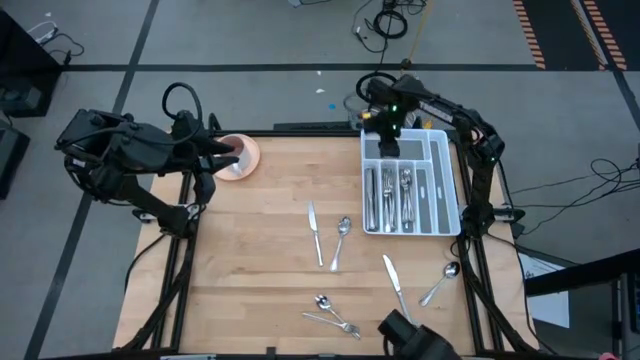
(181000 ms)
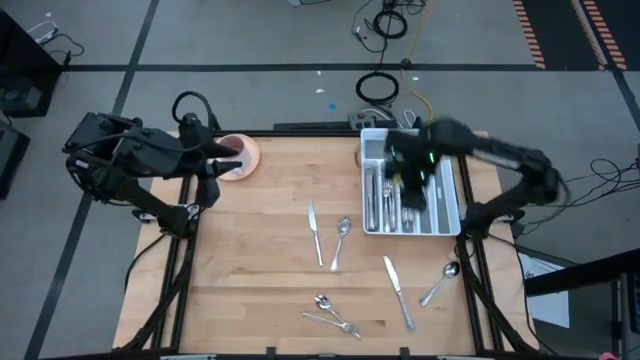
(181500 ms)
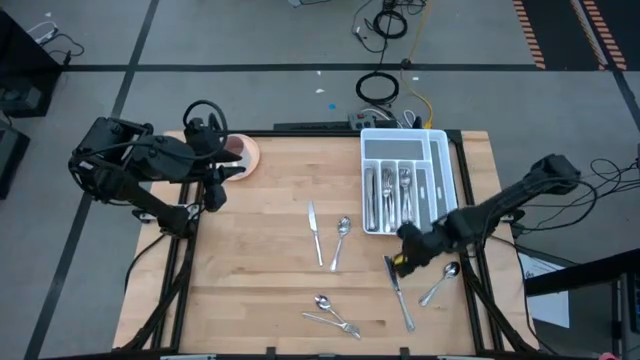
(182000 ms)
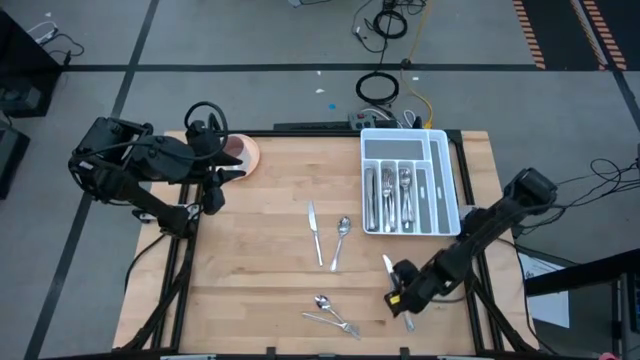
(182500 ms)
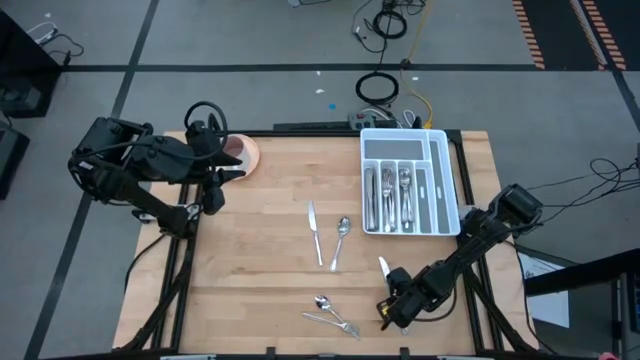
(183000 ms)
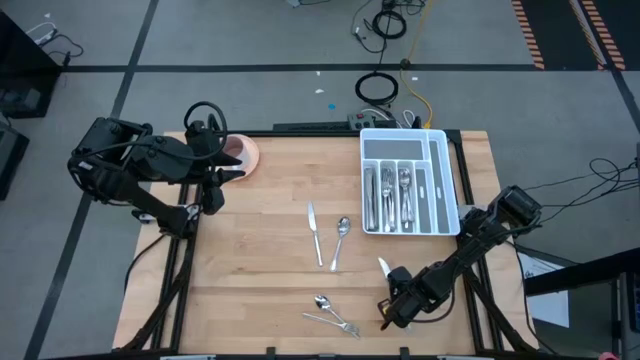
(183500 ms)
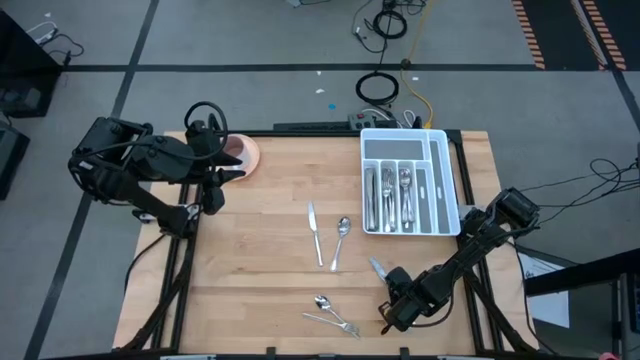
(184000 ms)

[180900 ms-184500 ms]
Task: Sort silverware
Put the silver knife into the white cutlery tray

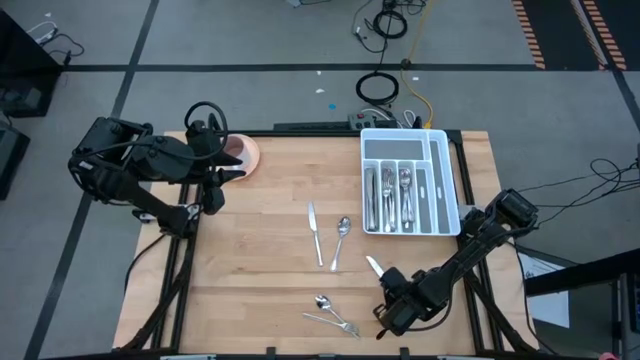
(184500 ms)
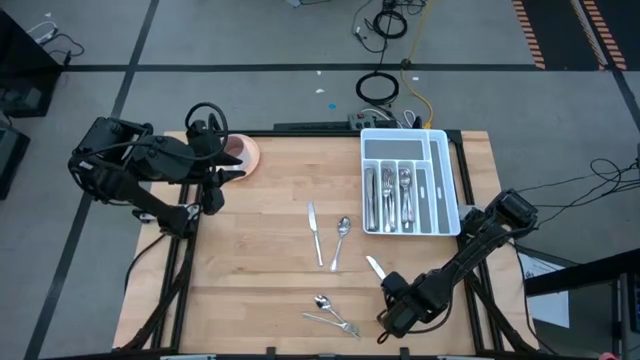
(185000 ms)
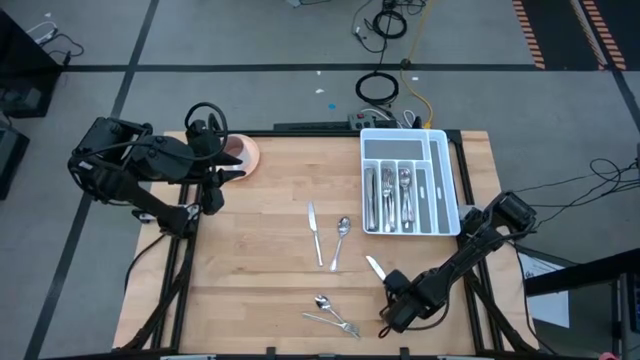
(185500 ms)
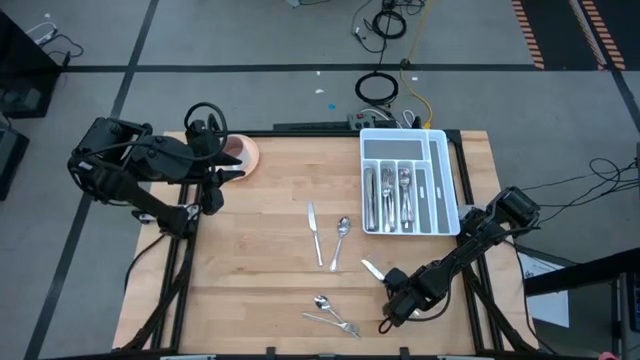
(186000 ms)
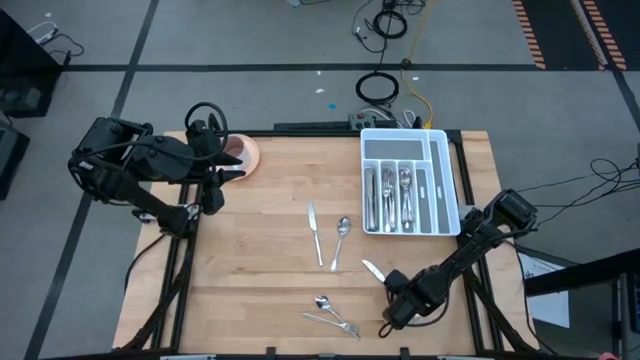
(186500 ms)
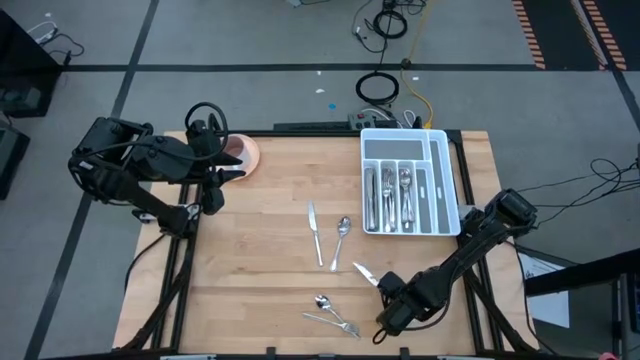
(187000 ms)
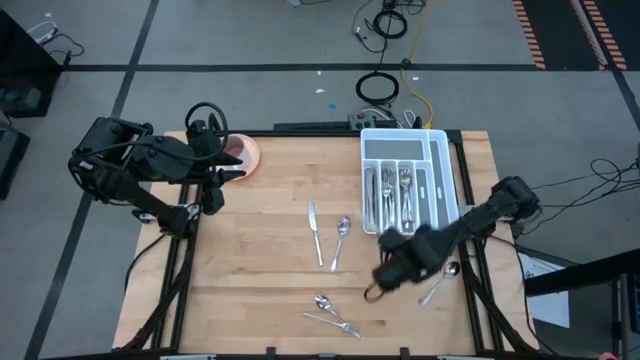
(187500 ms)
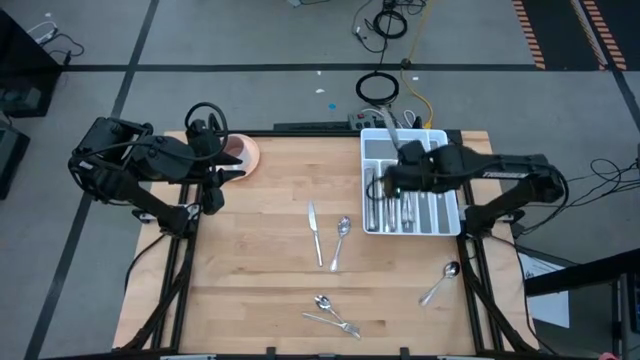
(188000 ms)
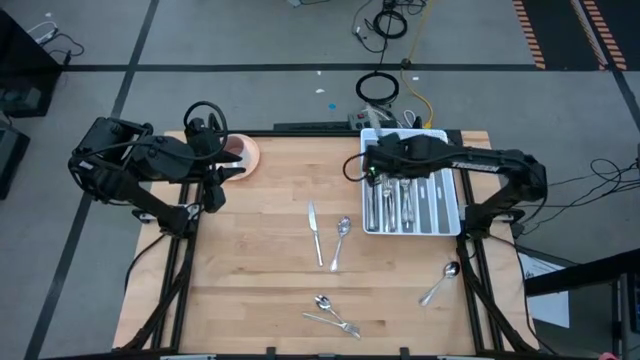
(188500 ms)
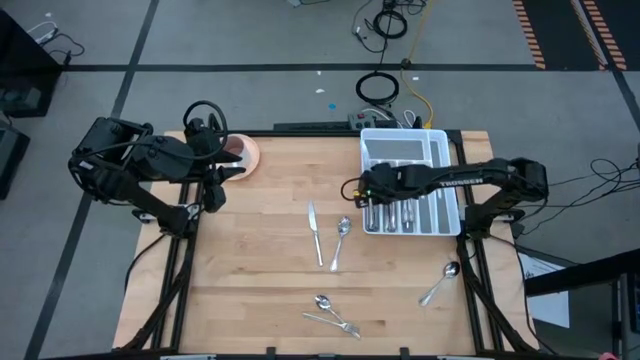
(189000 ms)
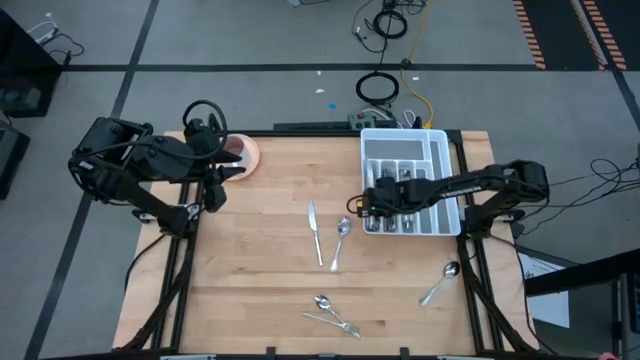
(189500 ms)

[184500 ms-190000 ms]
Put the silver knife into the white cutlery tray

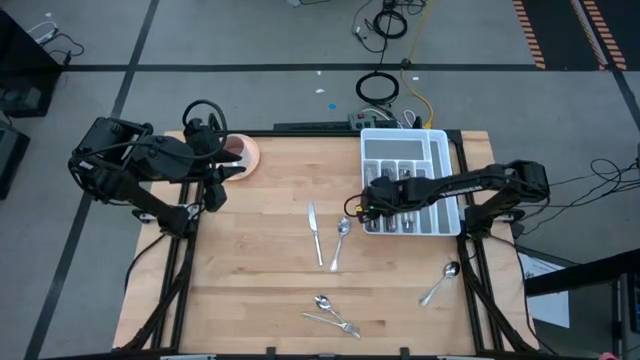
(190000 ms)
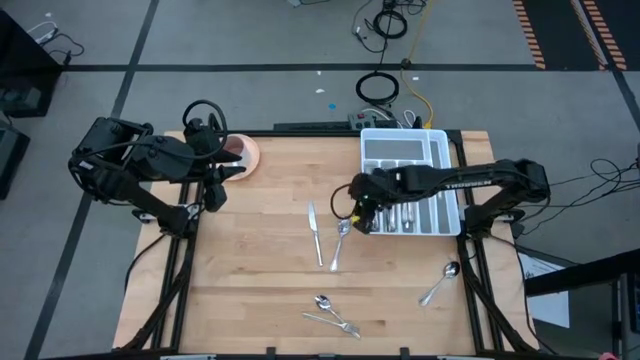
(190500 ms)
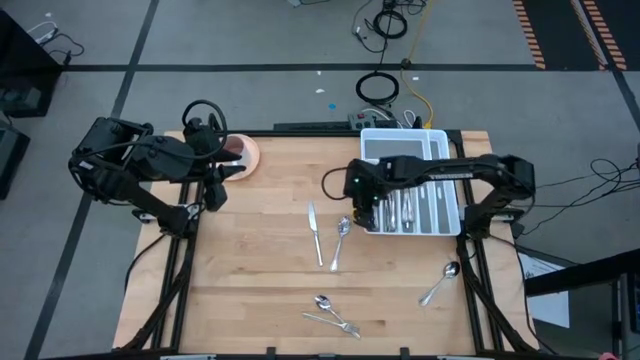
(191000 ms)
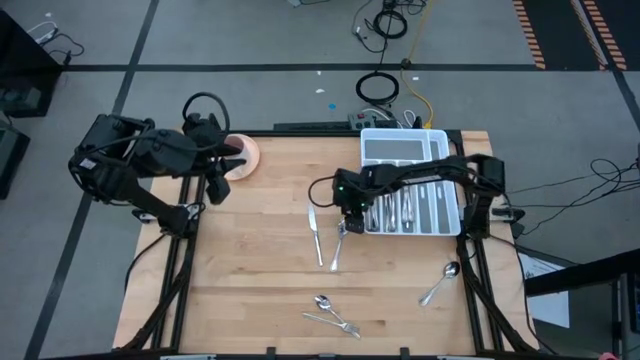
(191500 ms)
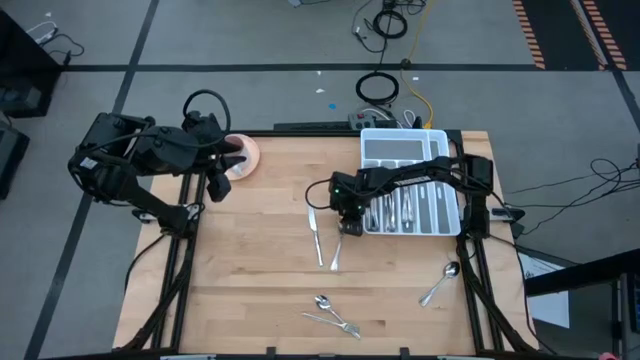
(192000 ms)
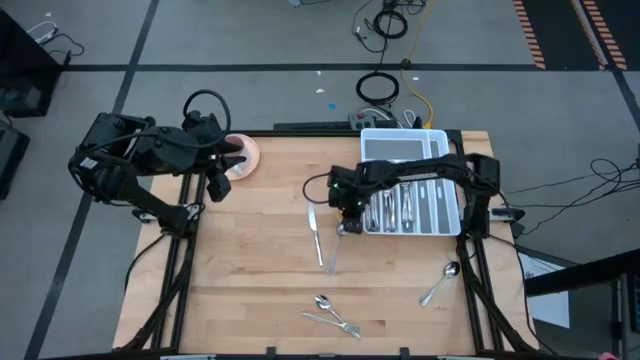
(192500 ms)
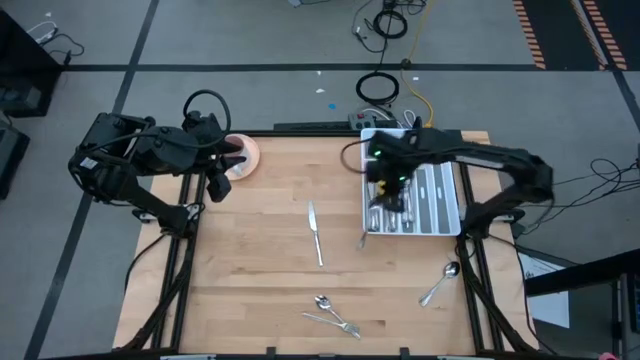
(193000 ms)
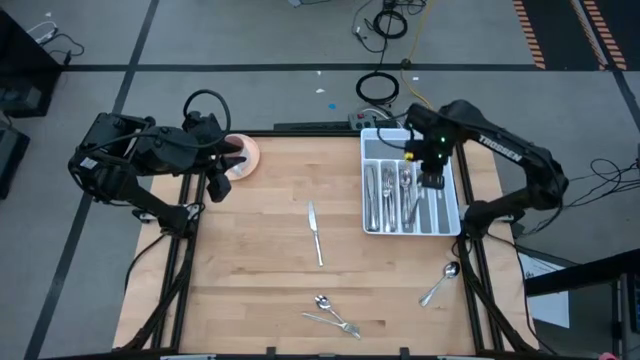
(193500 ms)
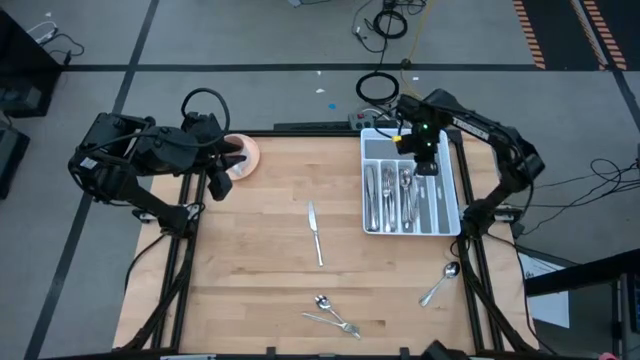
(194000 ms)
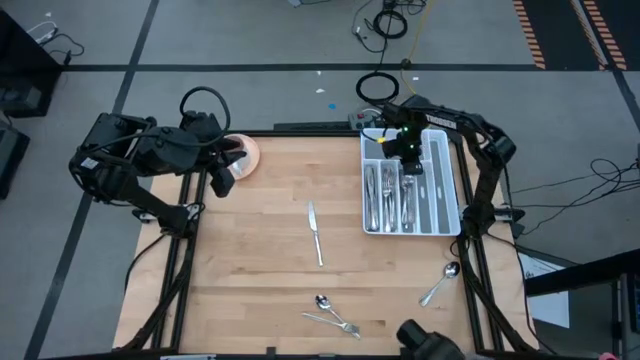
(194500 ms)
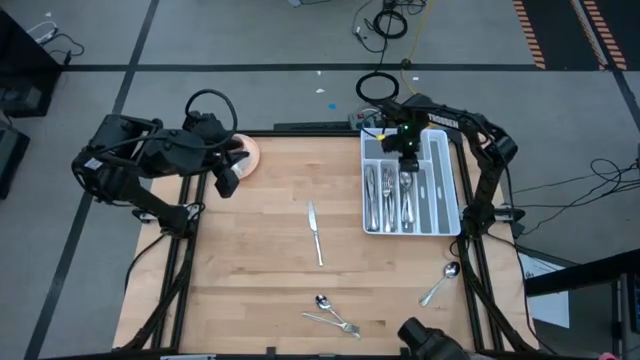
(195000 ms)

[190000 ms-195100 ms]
Put the silver spoon into the white cutlery tray

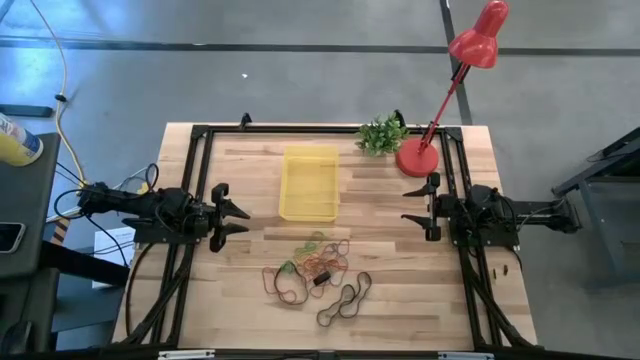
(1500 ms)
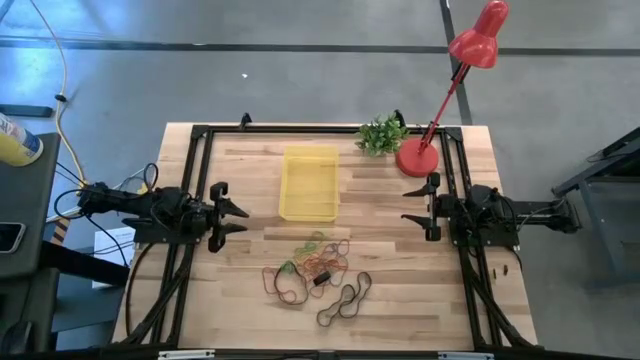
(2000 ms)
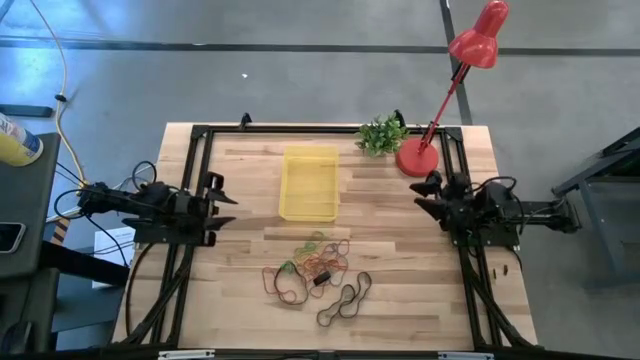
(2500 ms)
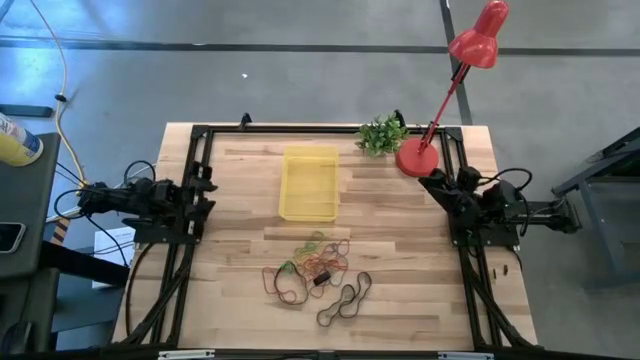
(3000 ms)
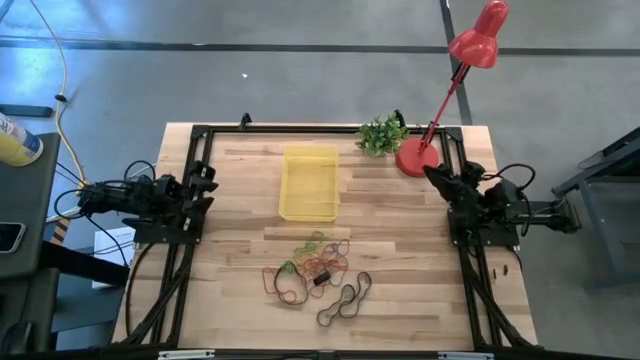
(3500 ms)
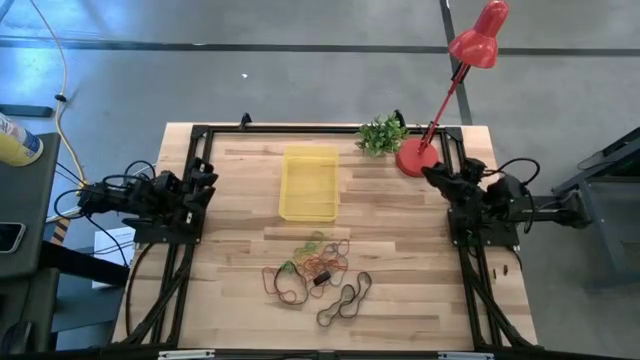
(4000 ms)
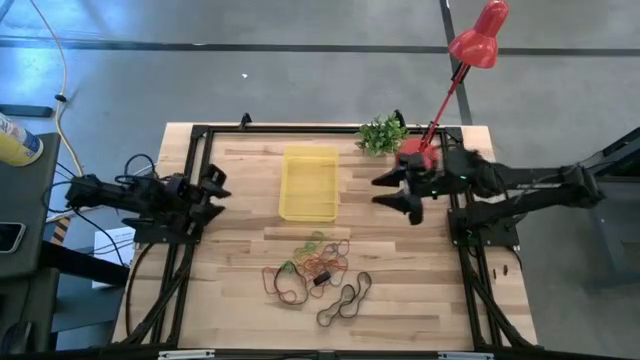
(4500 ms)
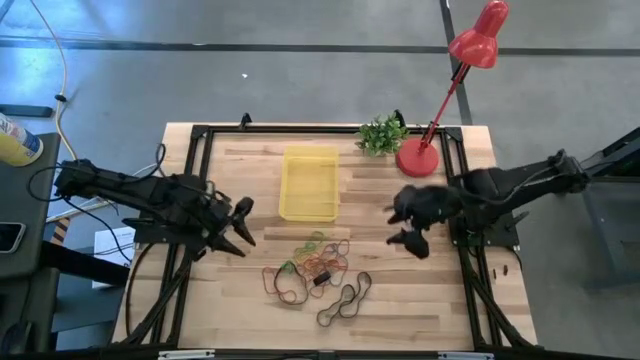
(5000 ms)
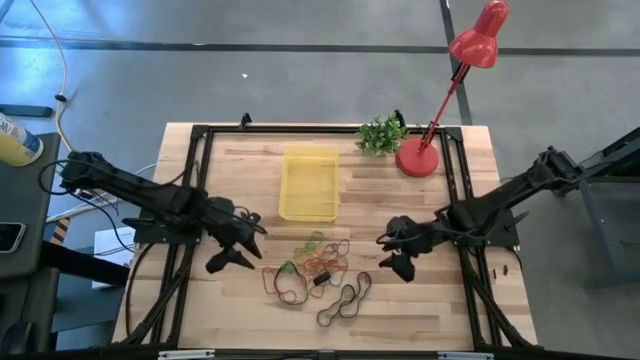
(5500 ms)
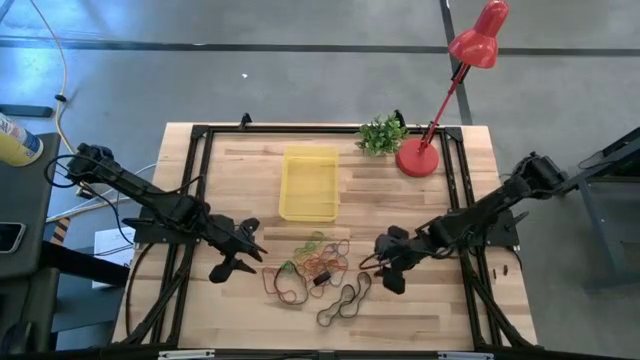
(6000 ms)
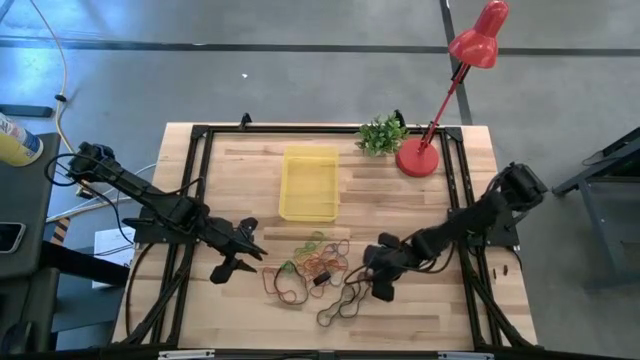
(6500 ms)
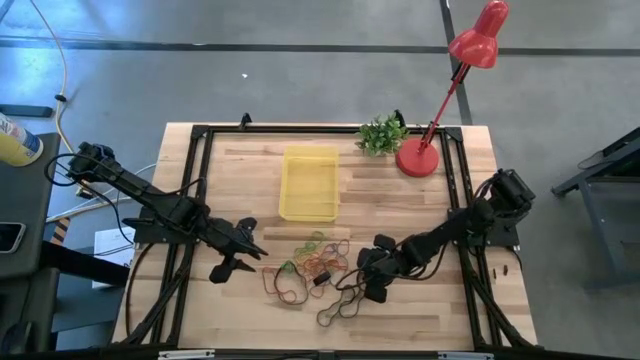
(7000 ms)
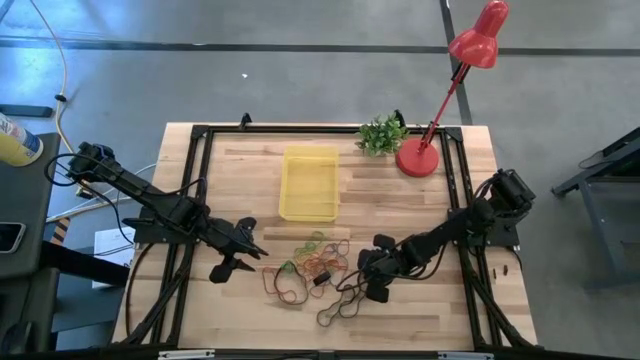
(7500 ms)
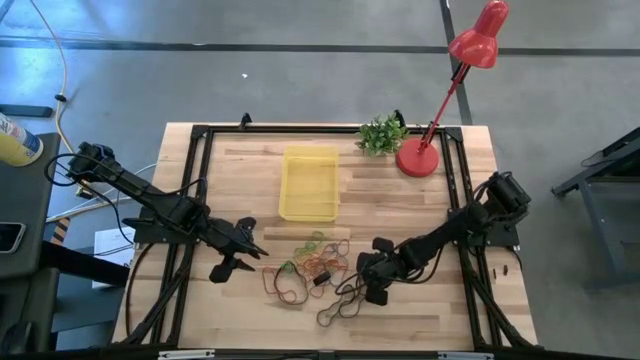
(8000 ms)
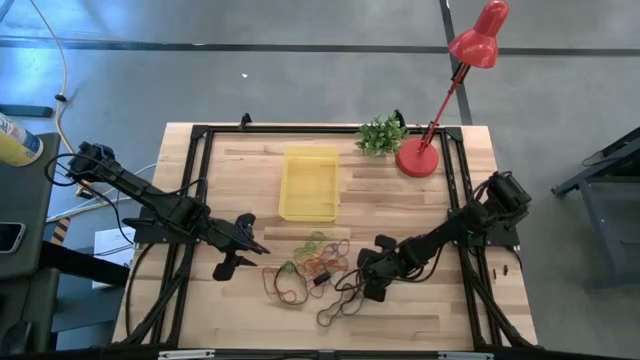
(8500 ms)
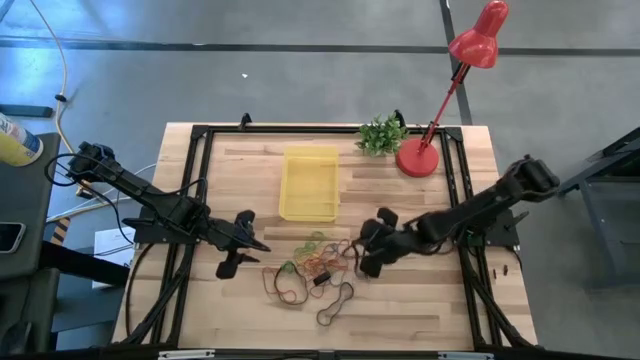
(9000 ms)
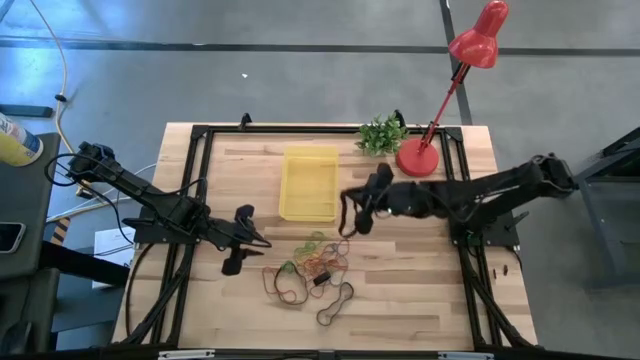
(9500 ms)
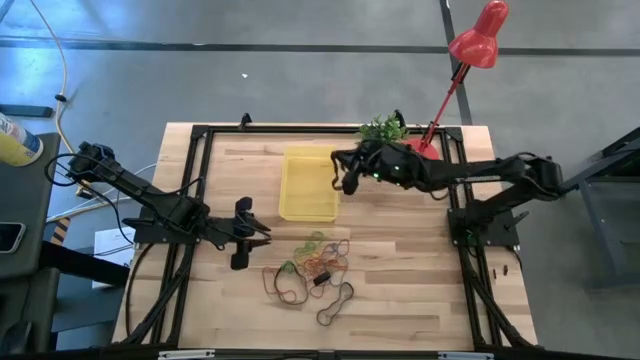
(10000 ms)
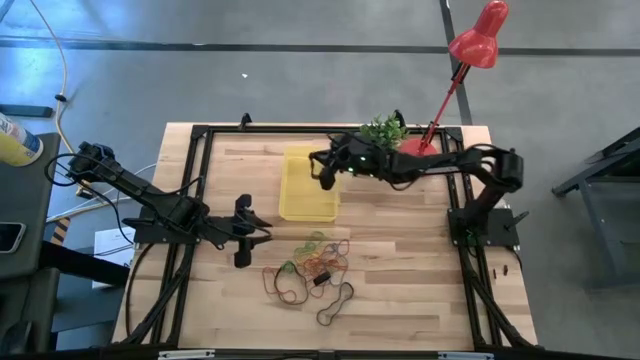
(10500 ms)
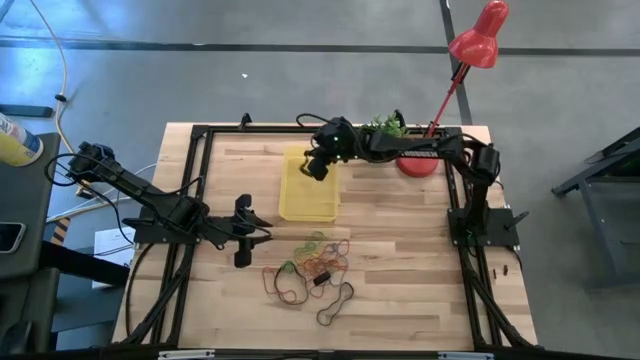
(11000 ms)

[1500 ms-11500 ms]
Task: Pick and place rubber bands into bin
Put the black rubber band into the yellow bin
